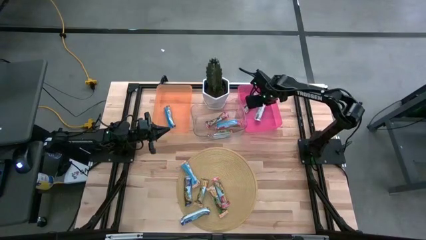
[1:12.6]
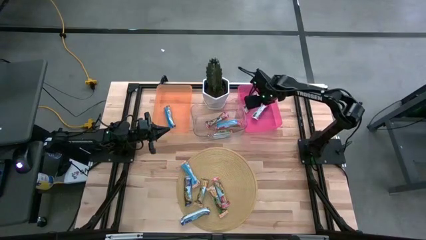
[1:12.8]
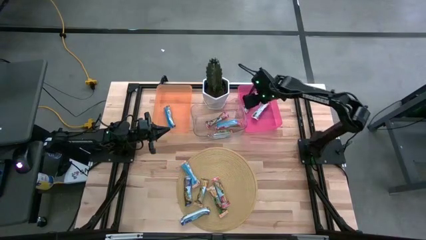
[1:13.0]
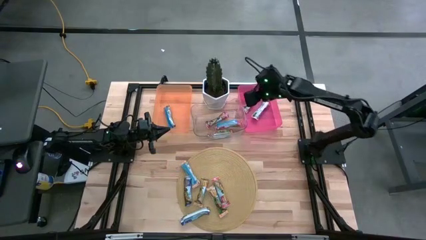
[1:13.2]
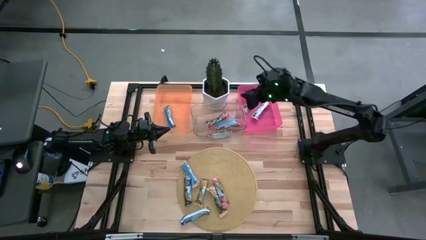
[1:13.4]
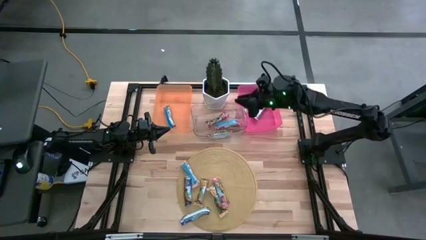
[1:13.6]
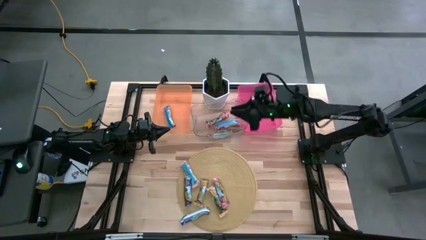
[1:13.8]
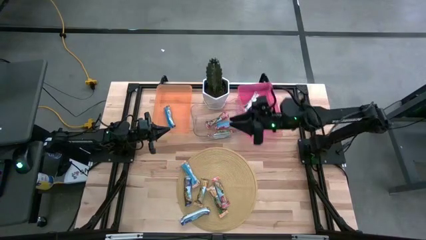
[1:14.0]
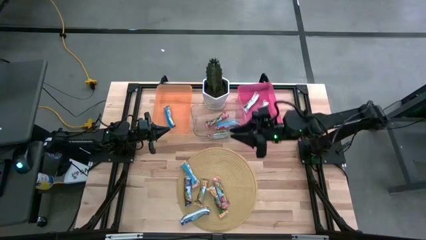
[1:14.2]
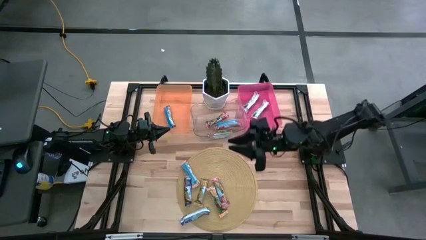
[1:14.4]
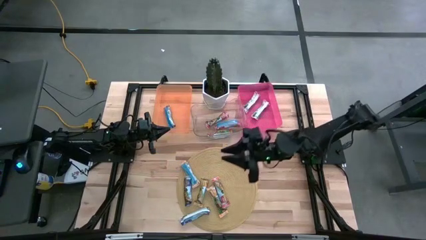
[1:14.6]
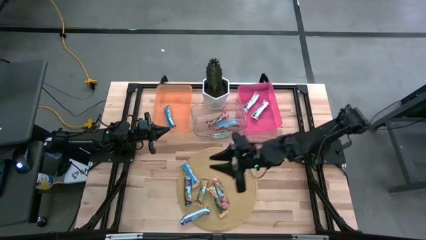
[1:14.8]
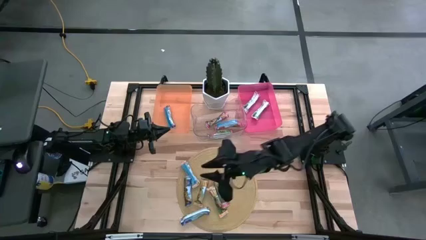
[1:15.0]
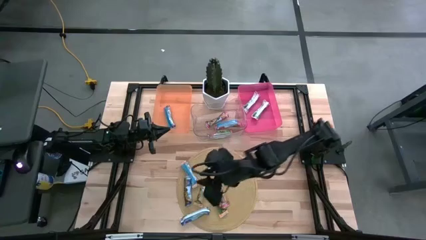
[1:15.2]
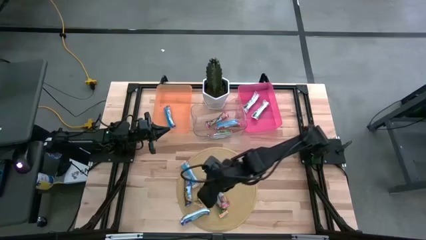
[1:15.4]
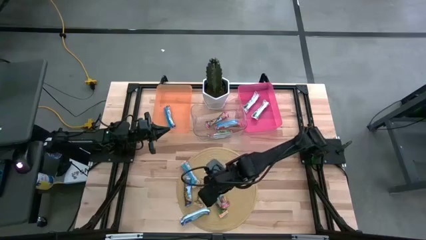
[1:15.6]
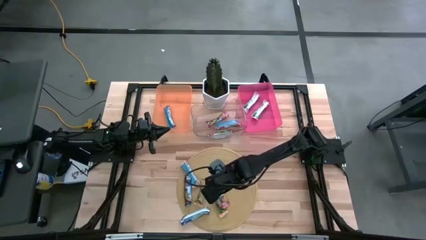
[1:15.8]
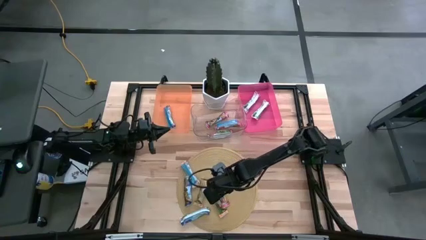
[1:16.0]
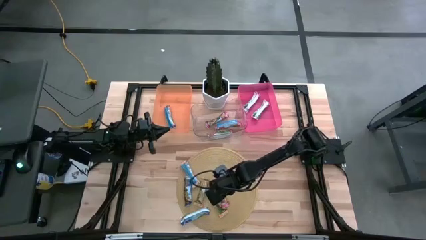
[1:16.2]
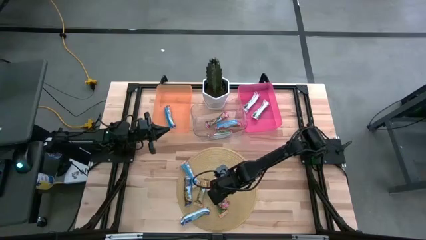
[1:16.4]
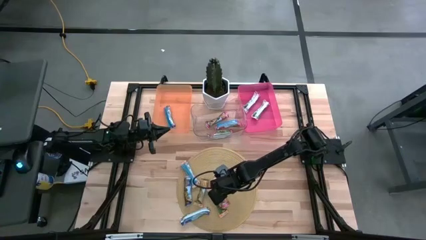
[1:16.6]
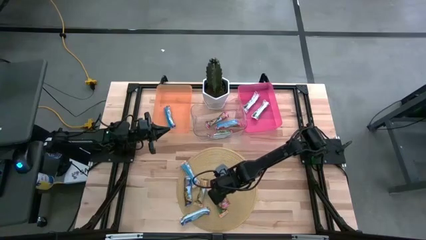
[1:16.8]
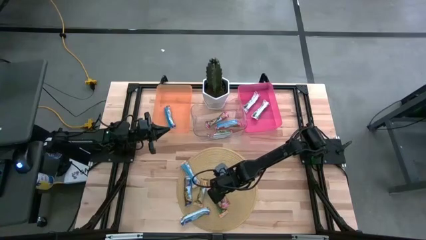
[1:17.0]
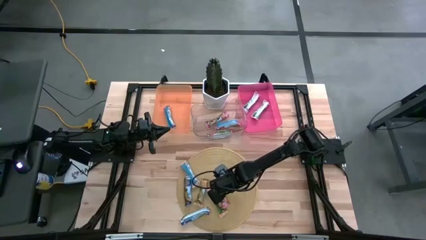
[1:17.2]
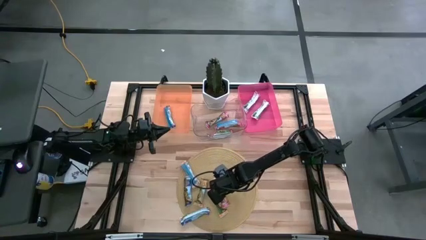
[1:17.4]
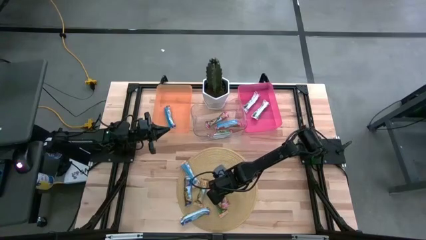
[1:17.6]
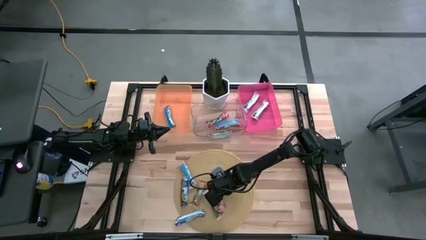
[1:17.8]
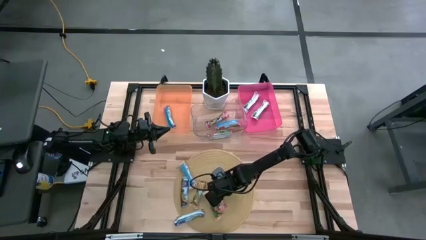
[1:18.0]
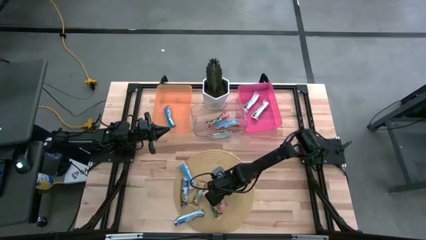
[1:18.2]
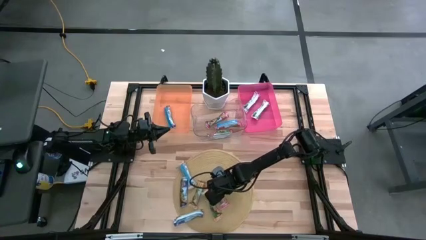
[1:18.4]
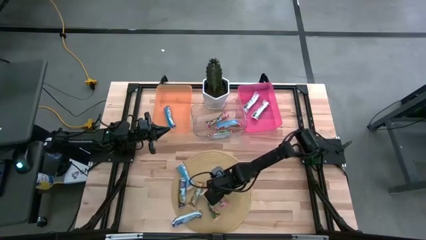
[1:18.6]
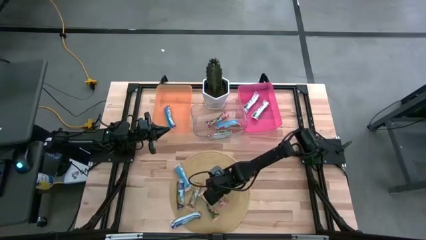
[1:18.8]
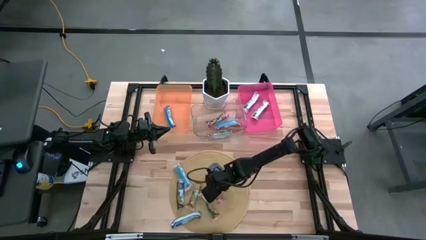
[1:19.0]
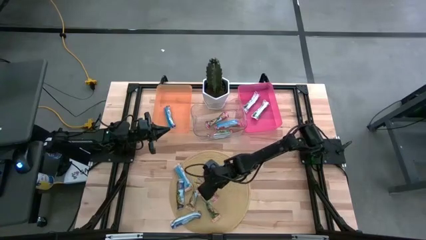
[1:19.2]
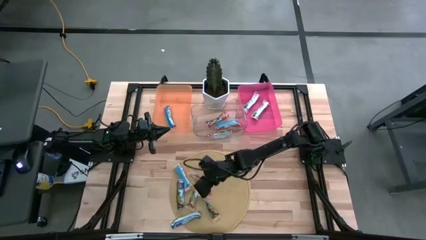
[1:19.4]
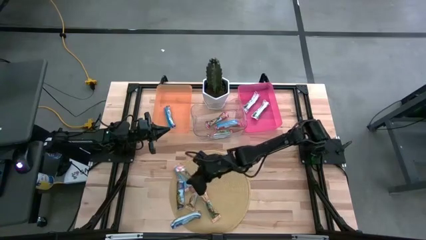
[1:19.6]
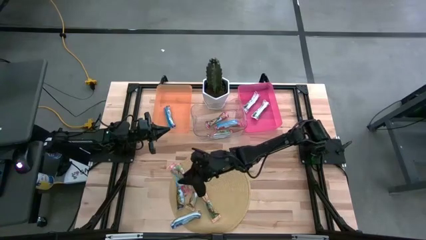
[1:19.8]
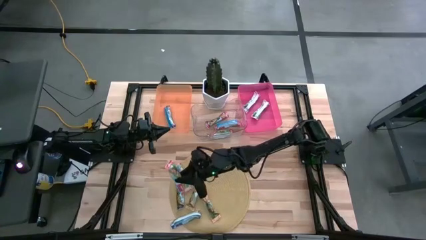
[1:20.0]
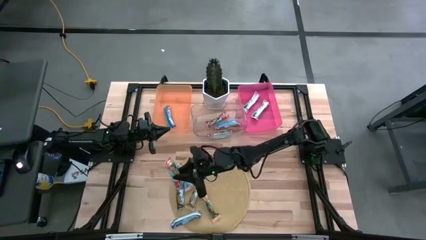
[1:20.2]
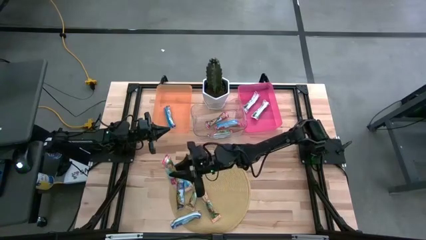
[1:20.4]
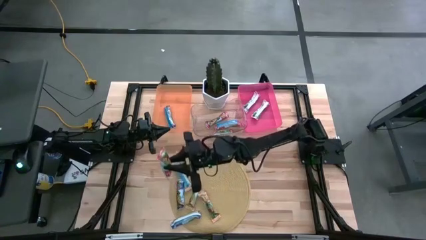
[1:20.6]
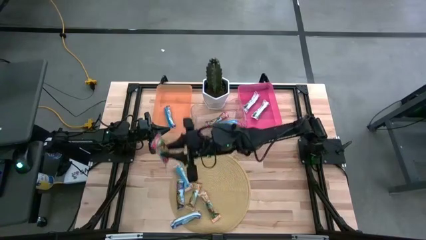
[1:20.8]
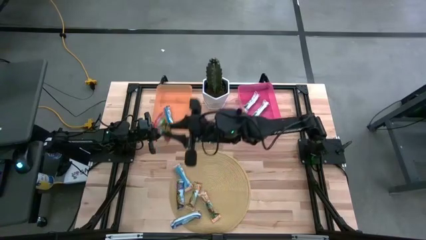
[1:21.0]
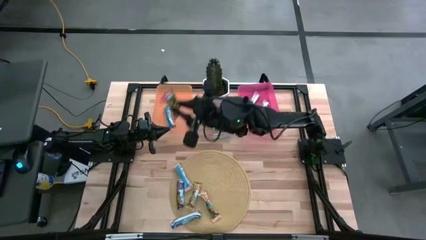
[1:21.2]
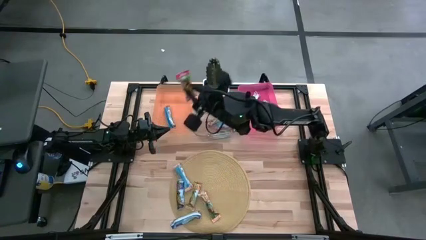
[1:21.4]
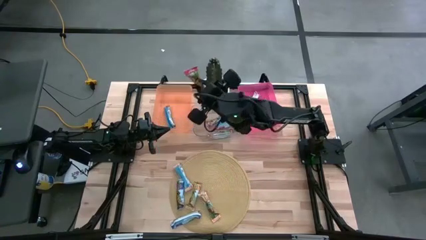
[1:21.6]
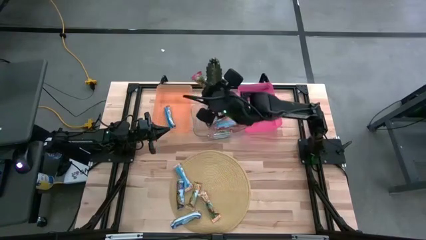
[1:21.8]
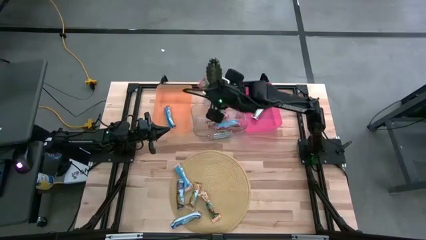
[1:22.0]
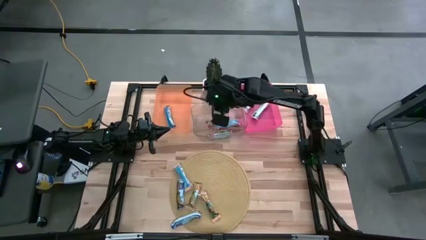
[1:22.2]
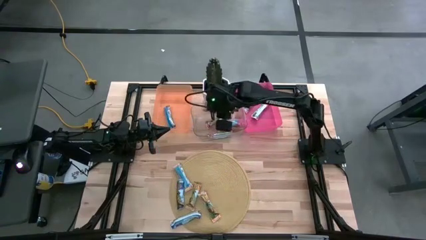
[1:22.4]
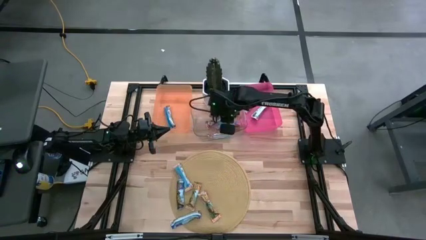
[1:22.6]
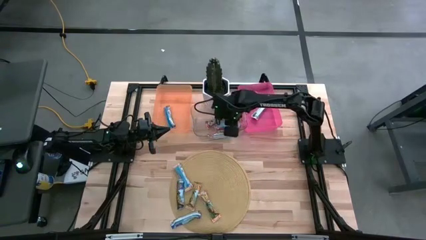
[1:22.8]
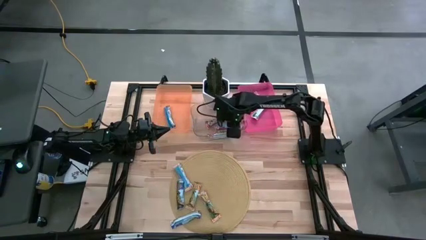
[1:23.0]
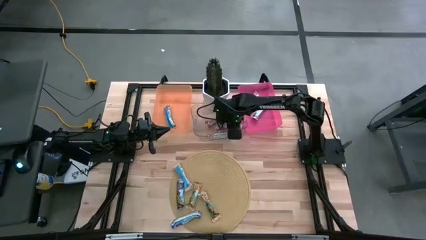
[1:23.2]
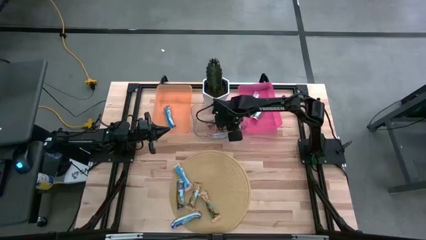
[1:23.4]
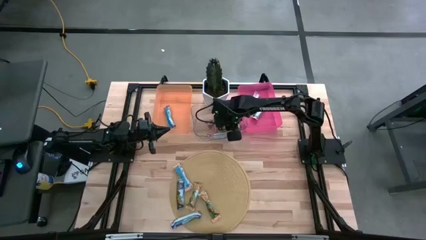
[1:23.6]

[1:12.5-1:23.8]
Task: Pick and place Granola Bars by type
Put the red granola bar into the transparent bin

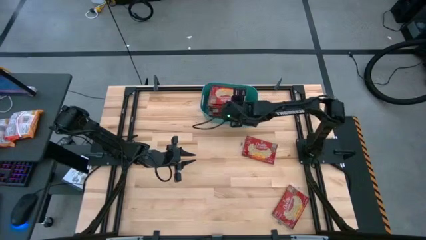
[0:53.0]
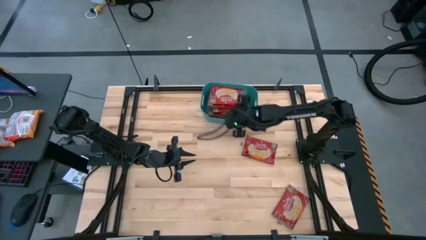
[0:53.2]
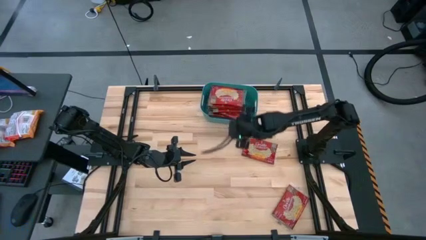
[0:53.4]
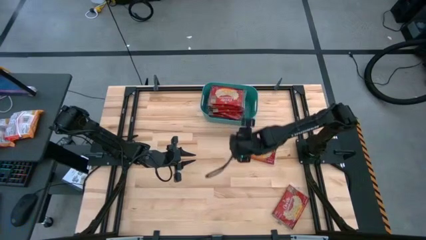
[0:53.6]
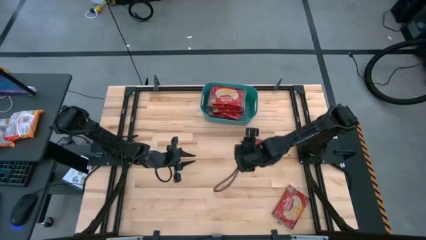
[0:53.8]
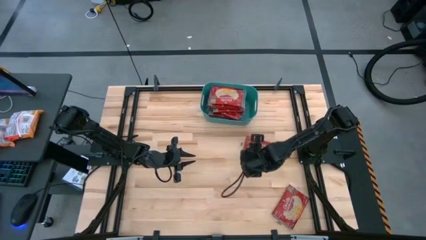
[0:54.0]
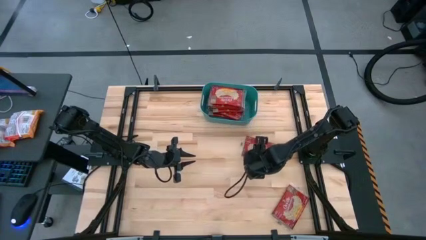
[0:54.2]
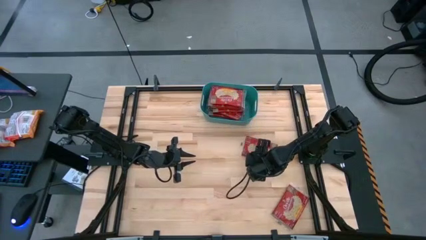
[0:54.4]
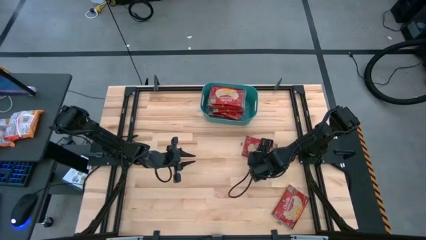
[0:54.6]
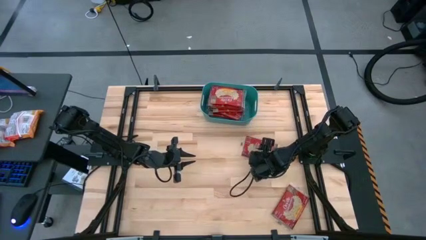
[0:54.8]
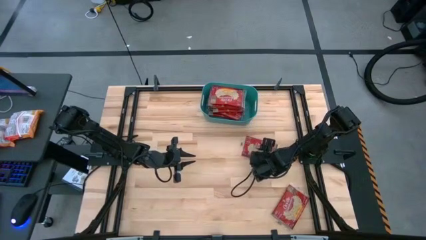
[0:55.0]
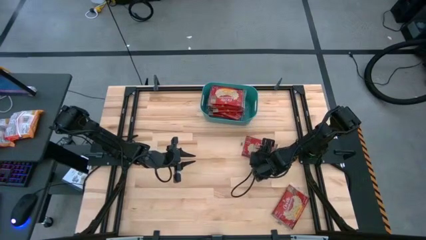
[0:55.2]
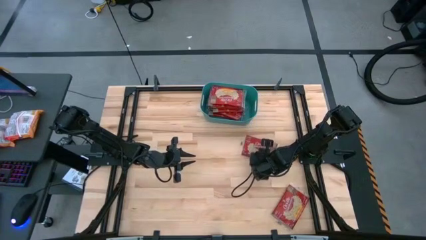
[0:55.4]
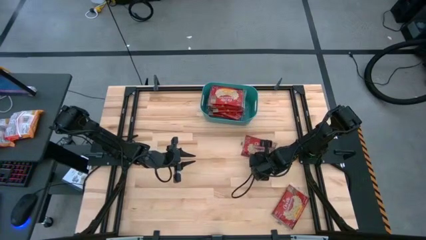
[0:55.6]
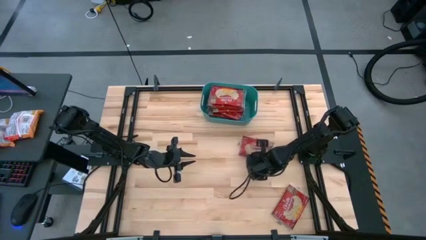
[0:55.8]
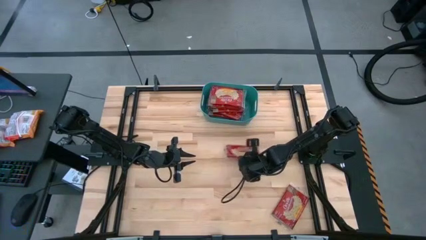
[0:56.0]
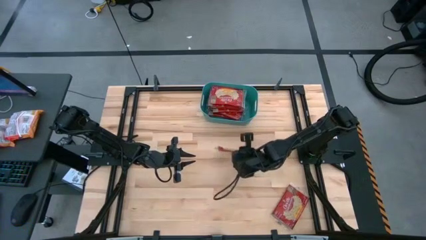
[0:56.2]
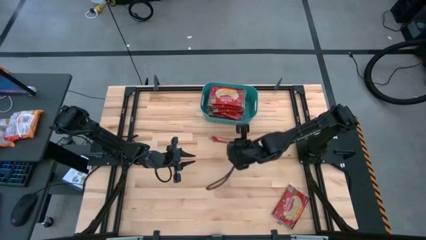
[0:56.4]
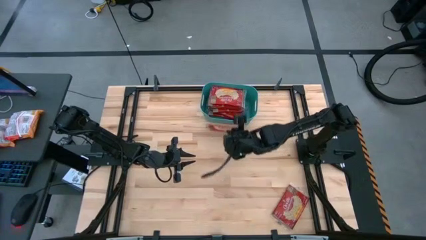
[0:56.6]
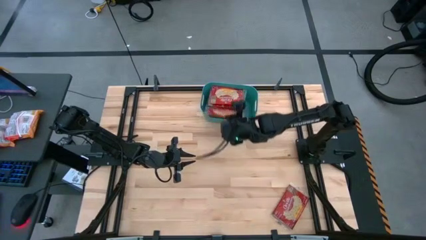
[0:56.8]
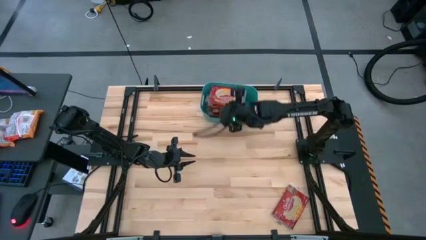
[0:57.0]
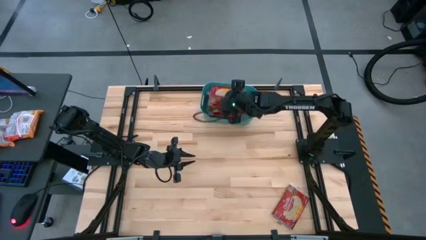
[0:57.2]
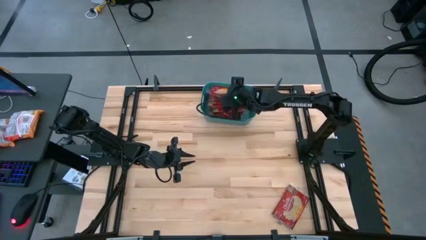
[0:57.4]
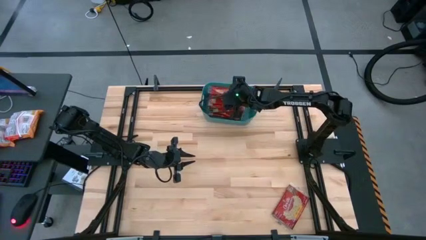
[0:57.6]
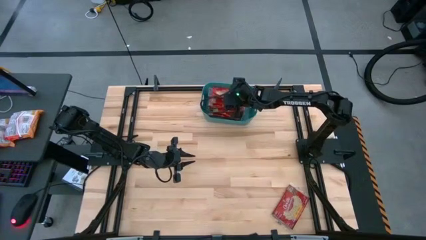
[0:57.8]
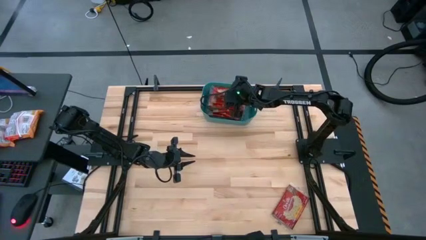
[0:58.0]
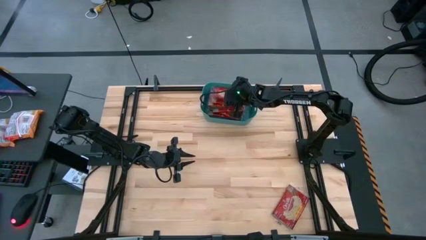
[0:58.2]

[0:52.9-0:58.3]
Task: Sort popcorn bags into baskets
Put the top red popcorn bag into the blue bin
